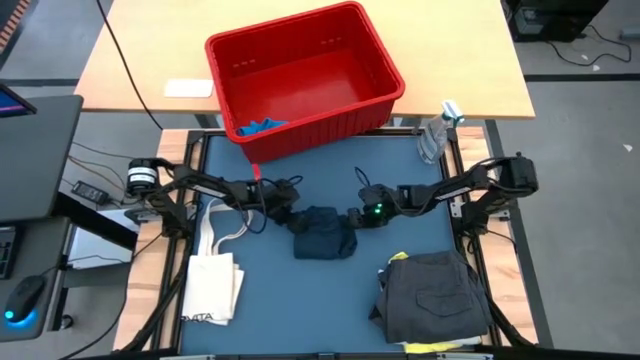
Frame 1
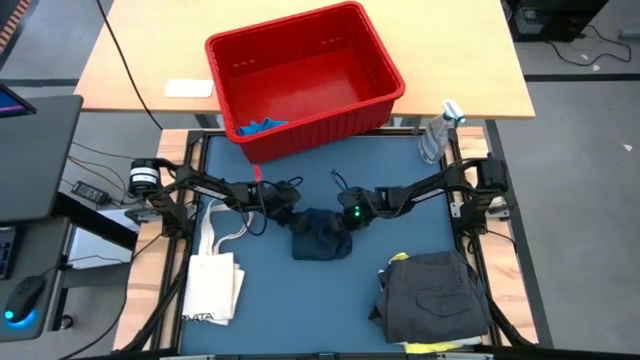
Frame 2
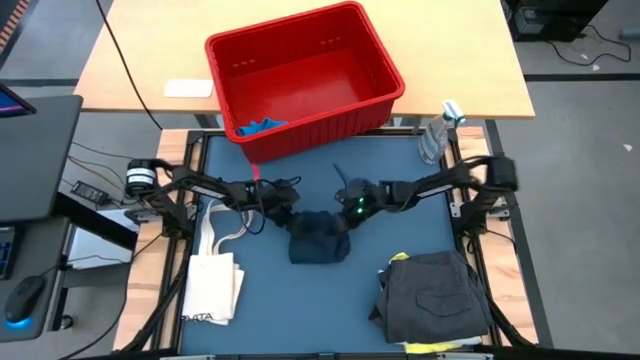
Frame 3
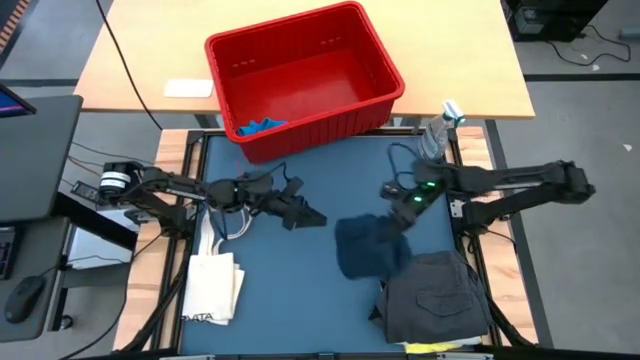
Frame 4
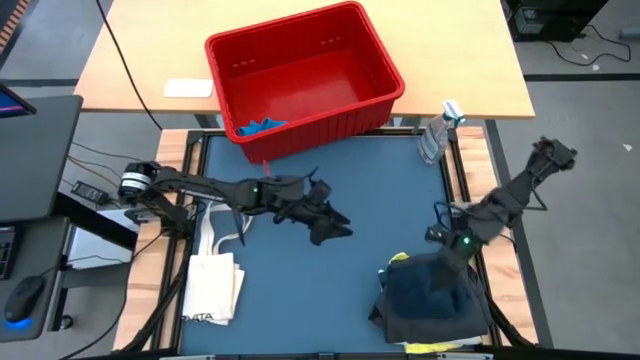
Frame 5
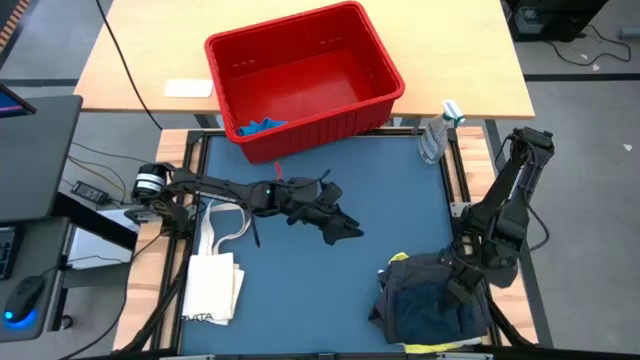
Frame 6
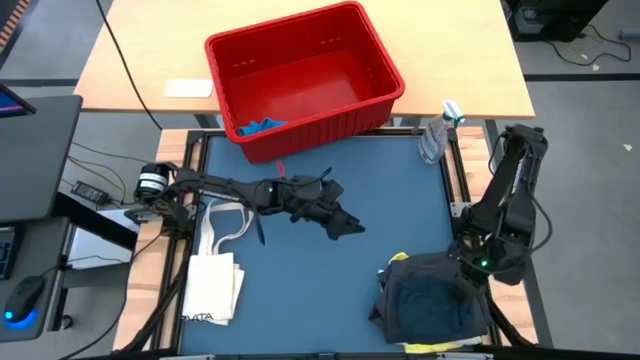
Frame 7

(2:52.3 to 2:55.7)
Task: Fold laundry
Stack the blue boxer on top of the gray boxer

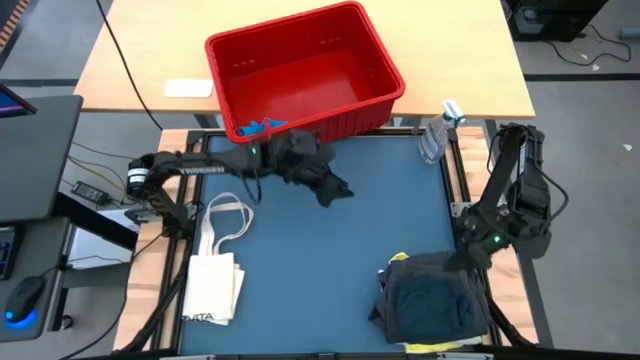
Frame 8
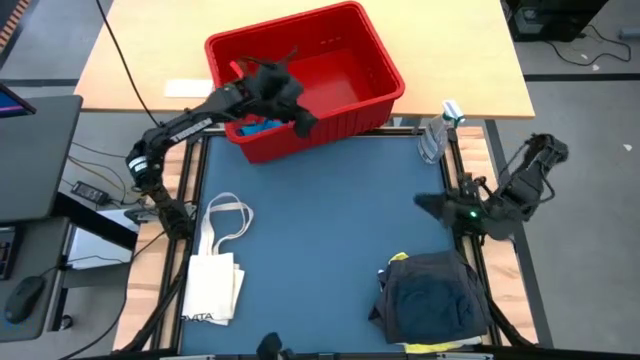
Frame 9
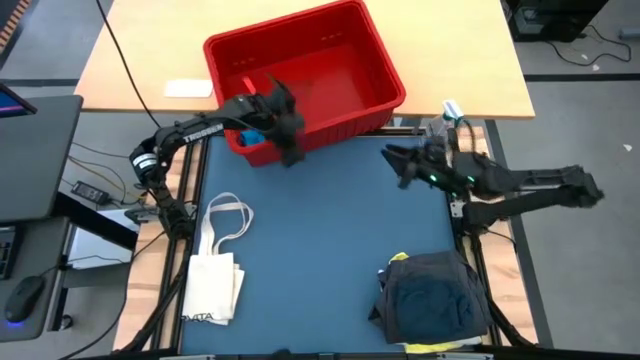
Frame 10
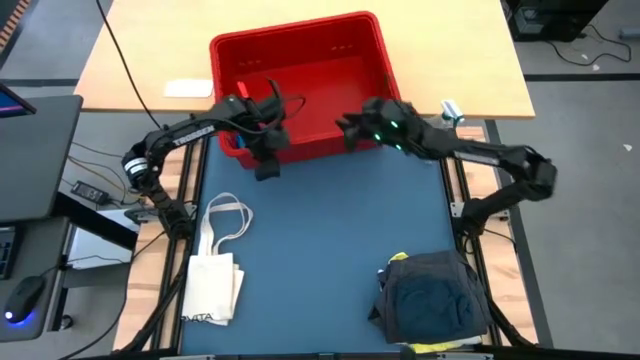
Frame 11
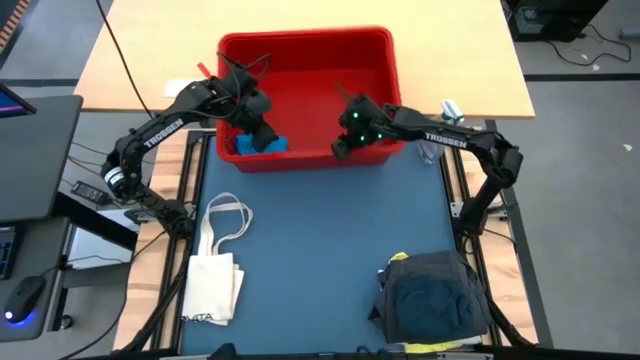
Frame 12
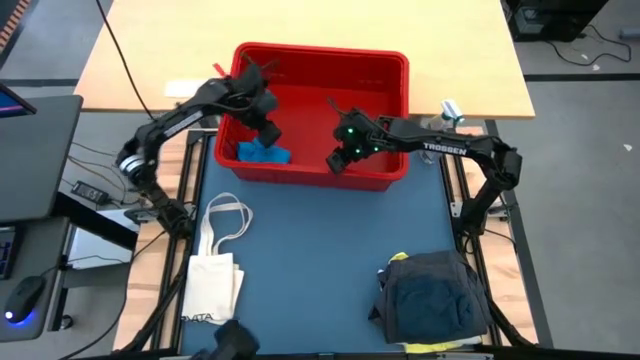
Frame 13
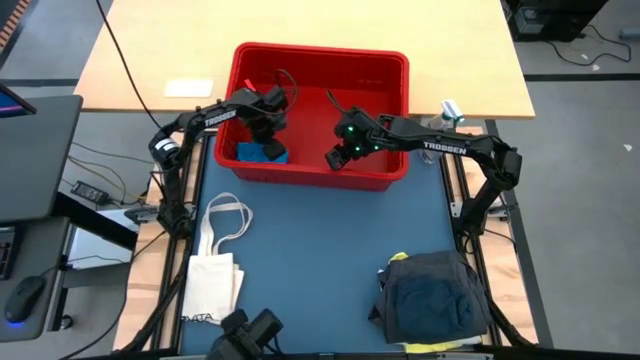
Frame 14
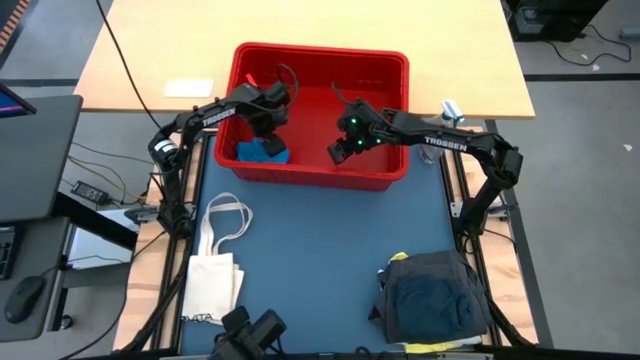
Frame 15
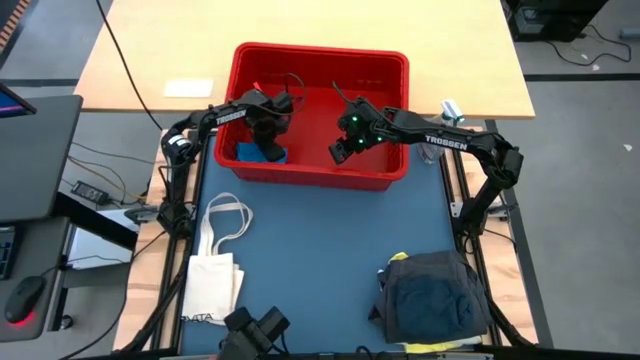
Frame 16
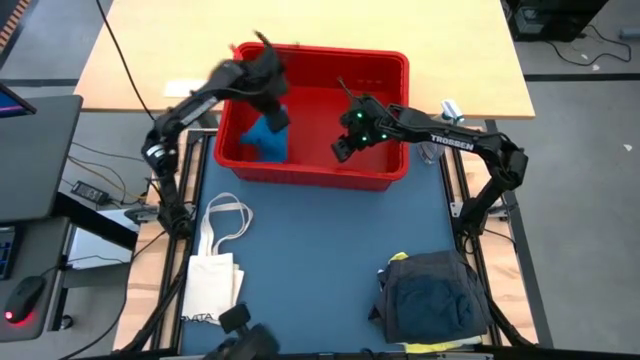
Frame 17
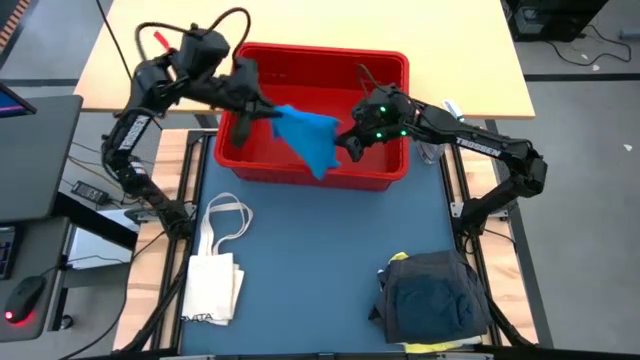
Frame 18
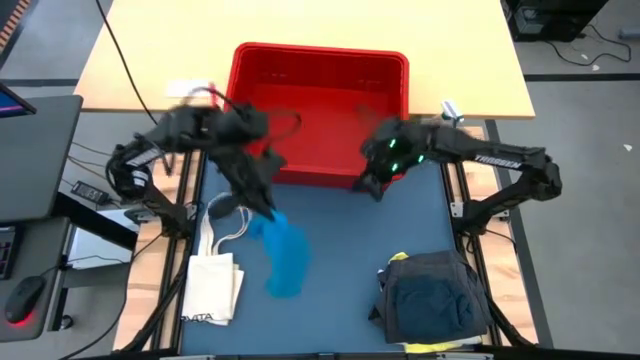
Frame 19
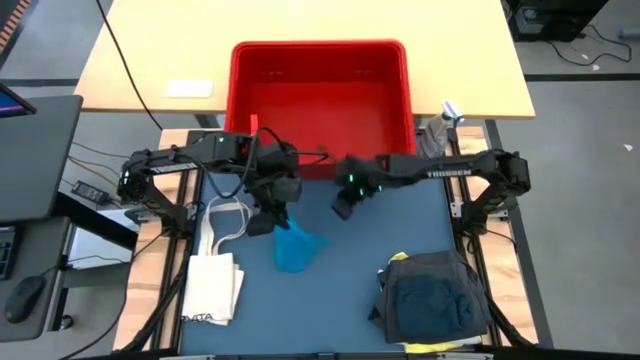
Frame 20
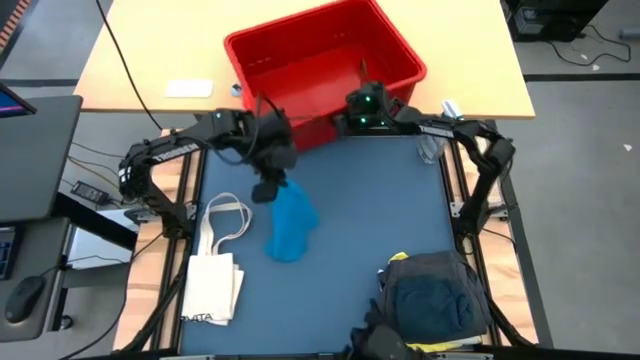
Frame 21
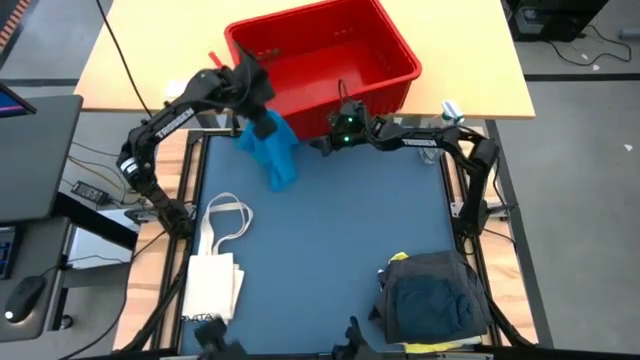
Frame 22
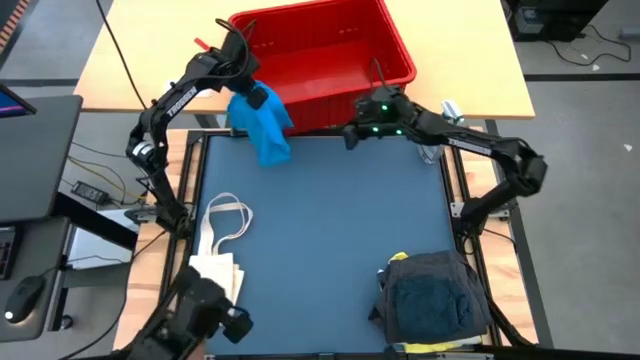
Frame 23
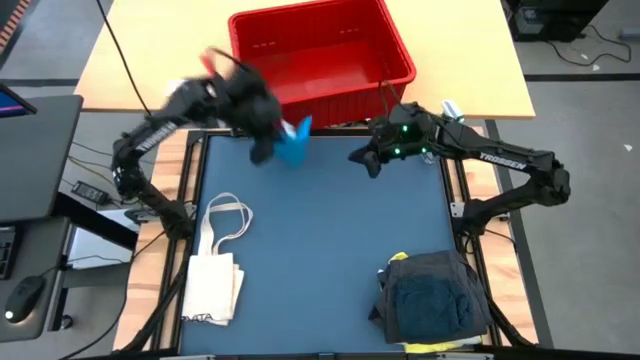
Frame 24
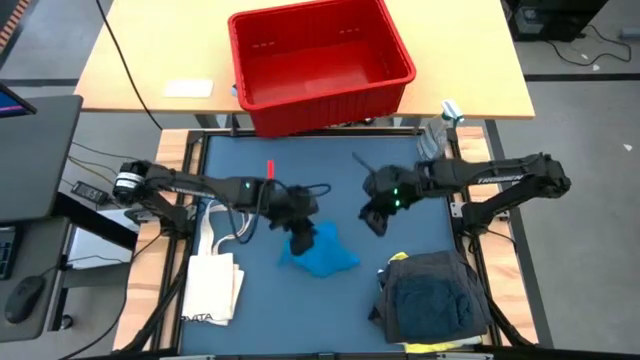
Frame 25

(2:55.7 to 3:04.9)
Remove the light blue boxer from the red bin

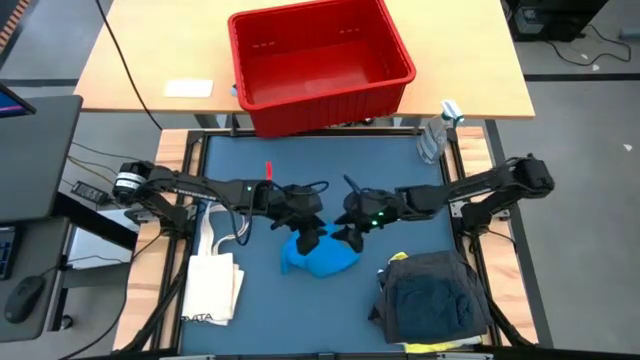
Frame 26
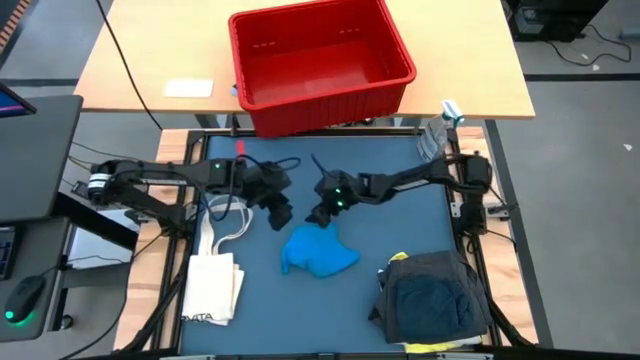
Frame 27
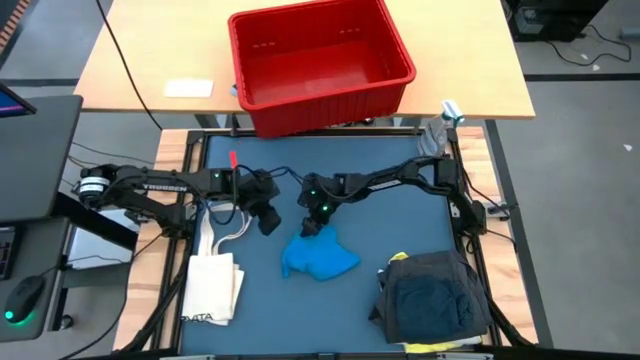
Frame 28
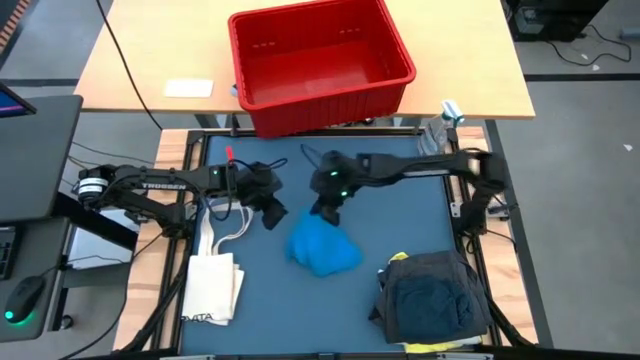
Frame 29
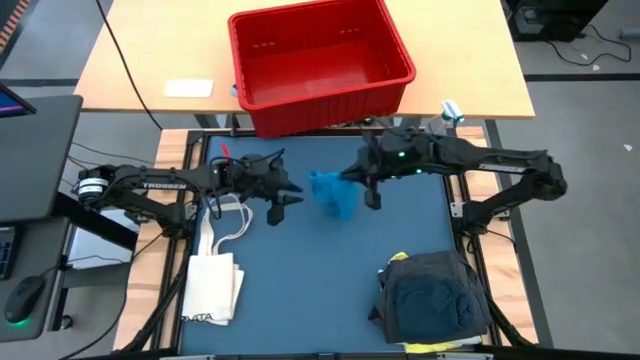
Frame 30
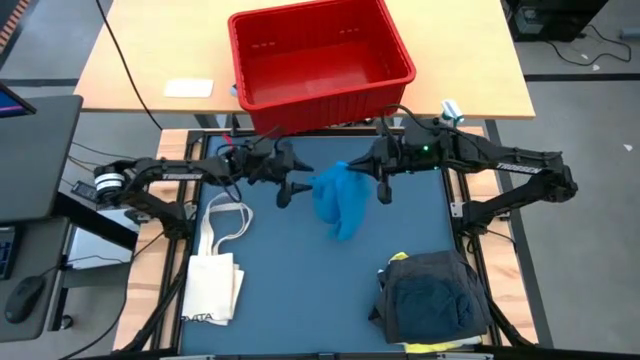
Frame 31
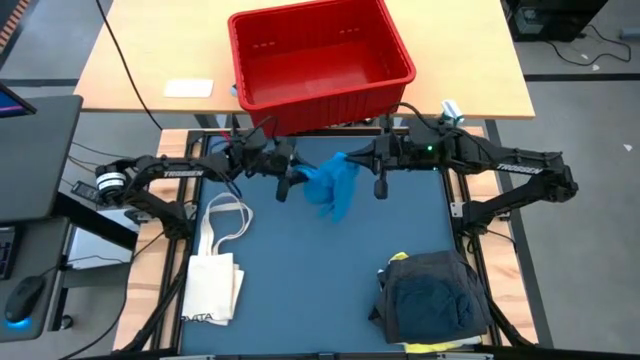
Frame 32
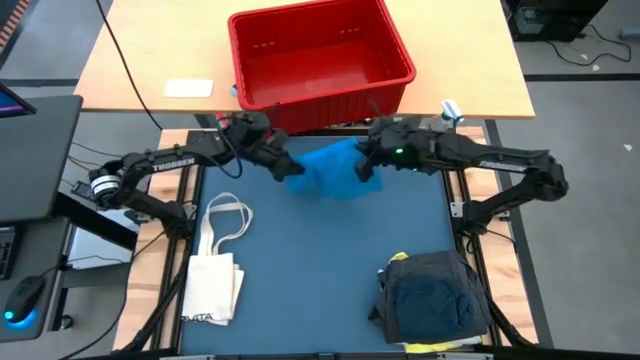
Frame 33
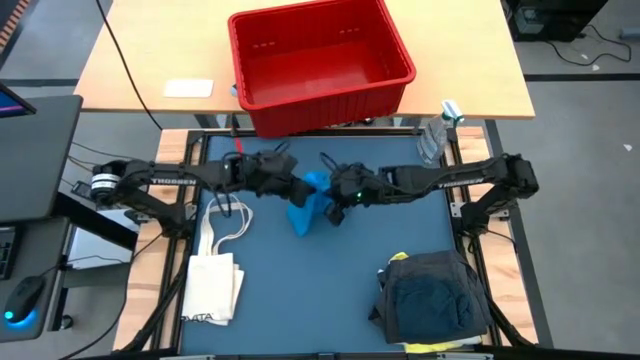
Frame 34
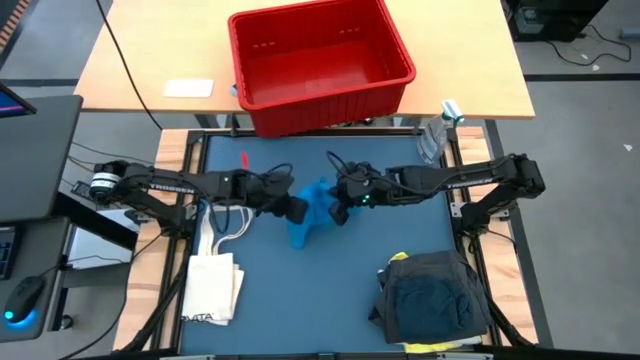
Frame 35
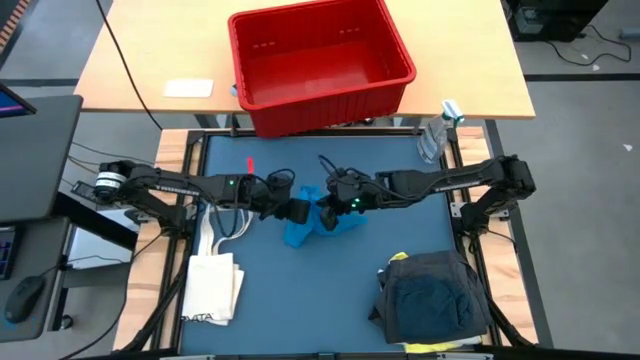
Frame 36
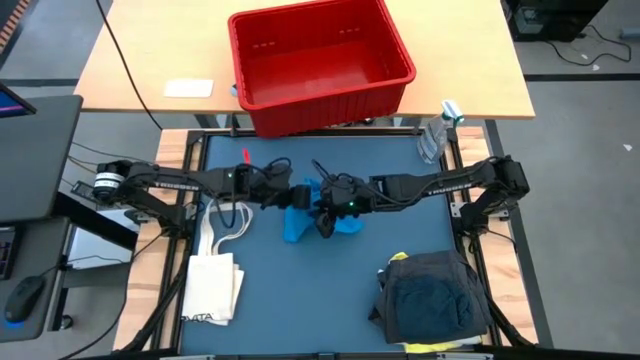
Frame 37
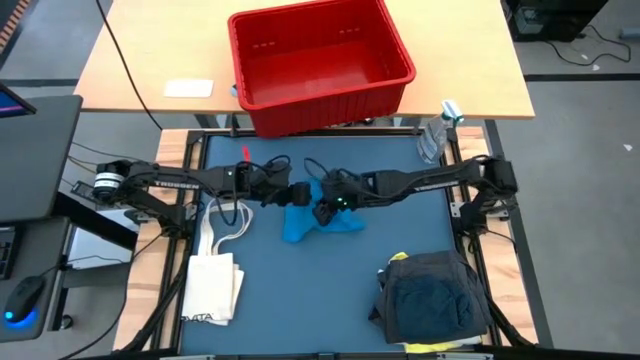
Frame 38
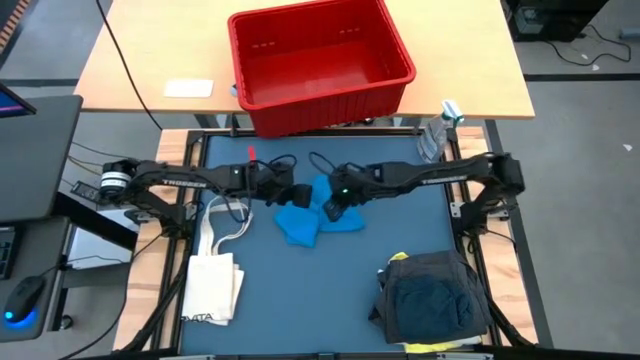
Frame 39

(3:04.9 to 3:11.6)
Fold the light blue boxer
